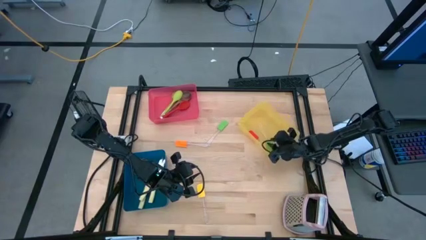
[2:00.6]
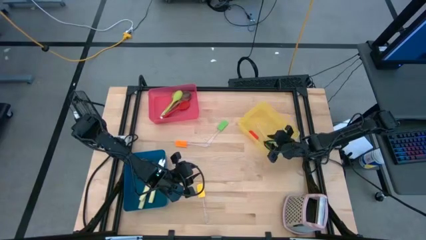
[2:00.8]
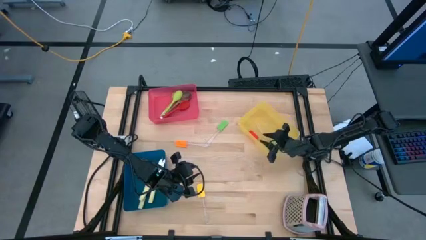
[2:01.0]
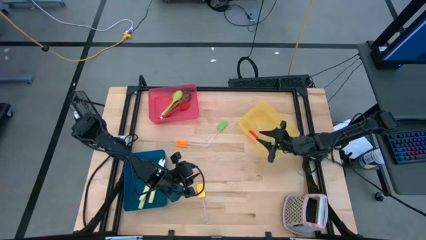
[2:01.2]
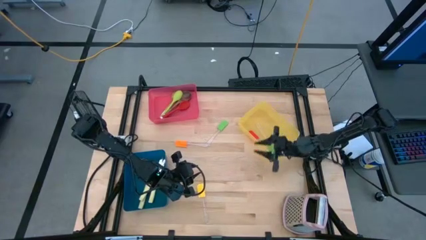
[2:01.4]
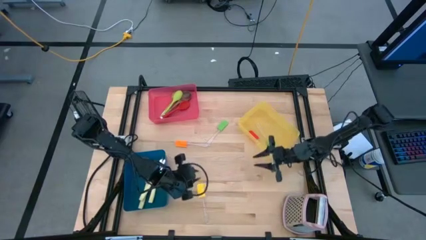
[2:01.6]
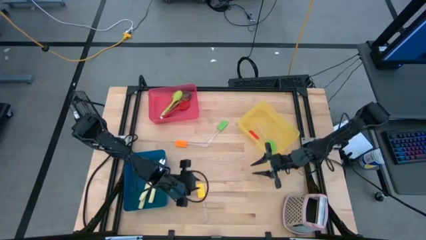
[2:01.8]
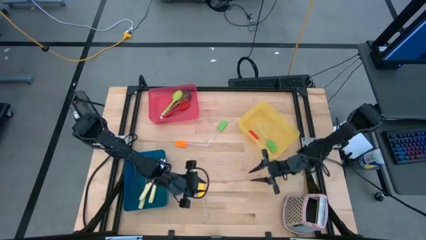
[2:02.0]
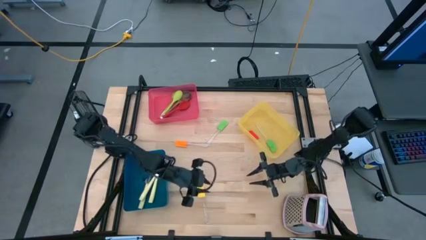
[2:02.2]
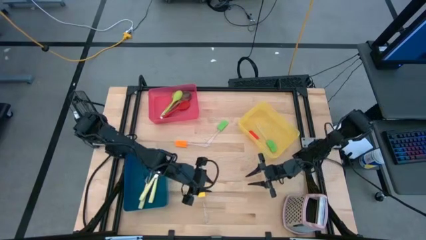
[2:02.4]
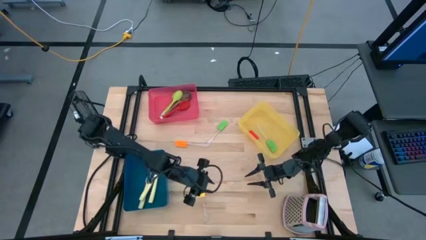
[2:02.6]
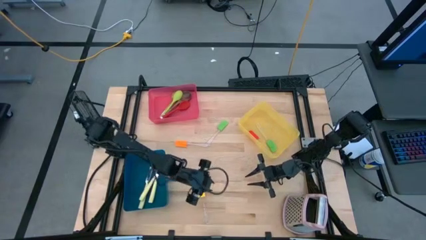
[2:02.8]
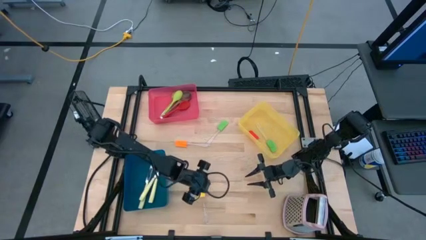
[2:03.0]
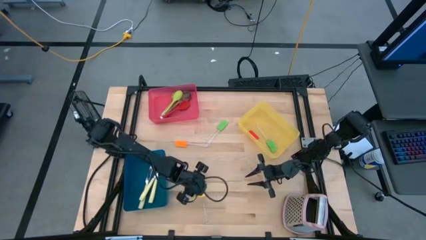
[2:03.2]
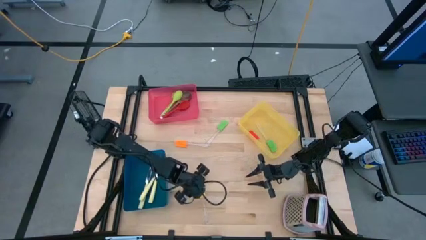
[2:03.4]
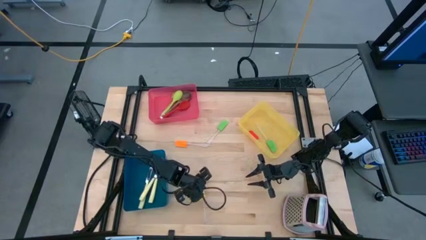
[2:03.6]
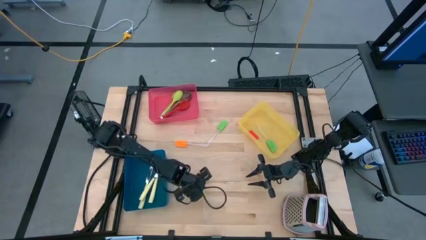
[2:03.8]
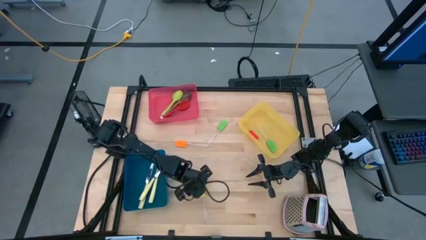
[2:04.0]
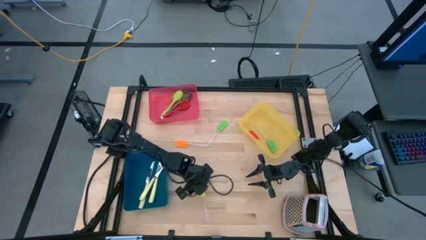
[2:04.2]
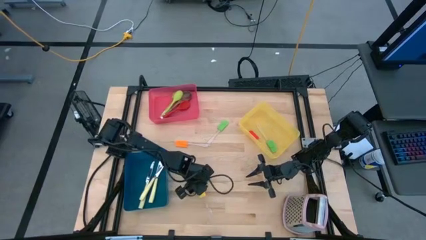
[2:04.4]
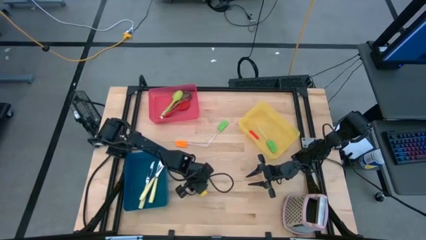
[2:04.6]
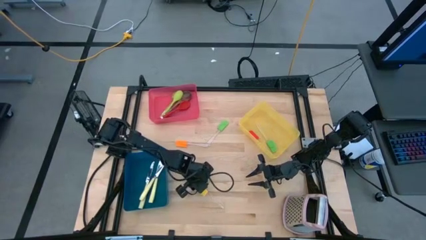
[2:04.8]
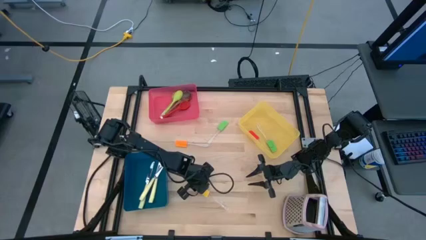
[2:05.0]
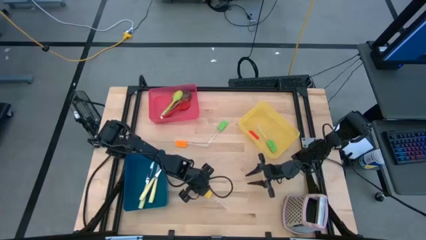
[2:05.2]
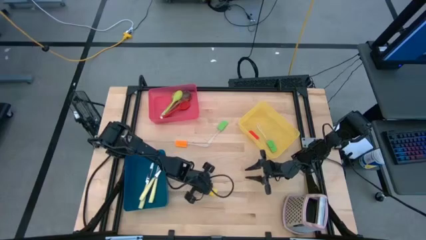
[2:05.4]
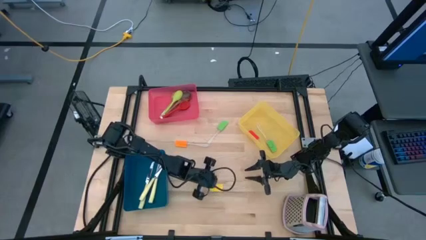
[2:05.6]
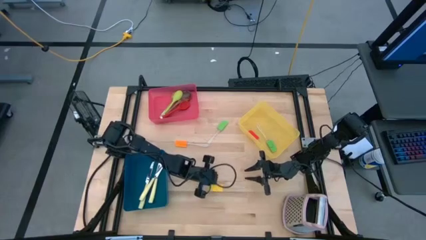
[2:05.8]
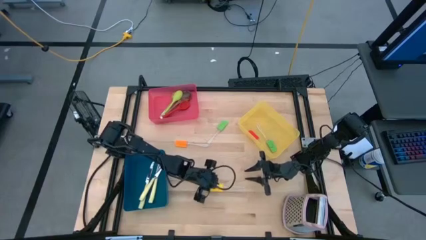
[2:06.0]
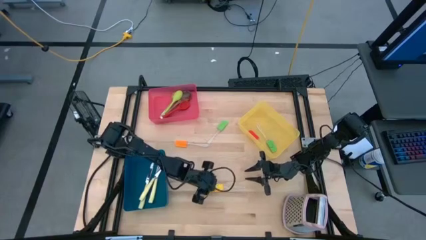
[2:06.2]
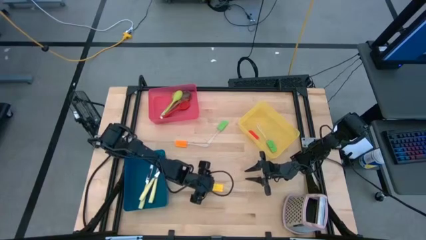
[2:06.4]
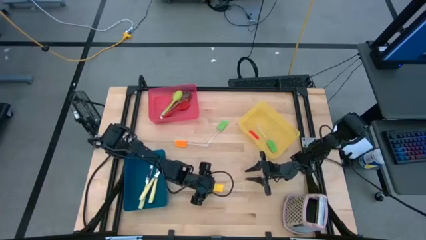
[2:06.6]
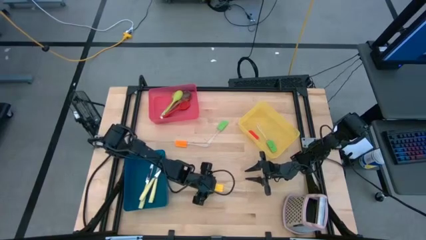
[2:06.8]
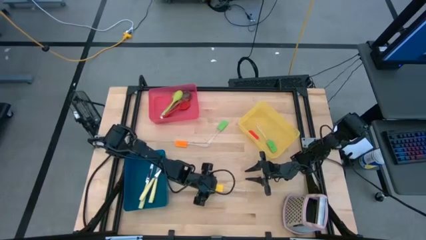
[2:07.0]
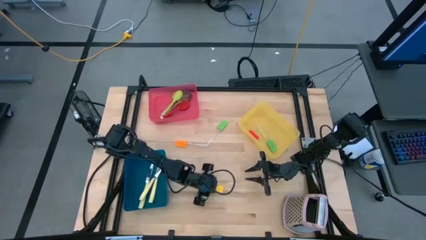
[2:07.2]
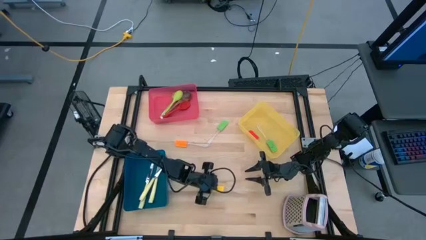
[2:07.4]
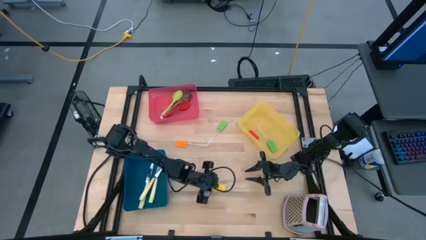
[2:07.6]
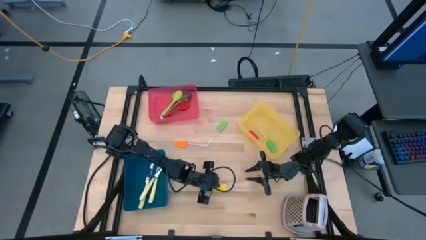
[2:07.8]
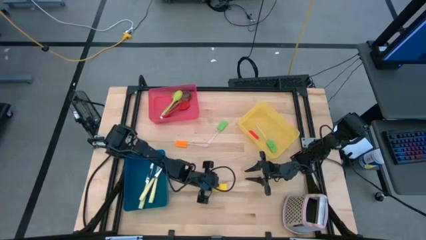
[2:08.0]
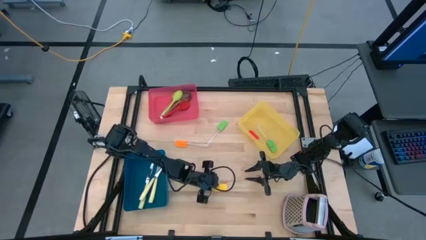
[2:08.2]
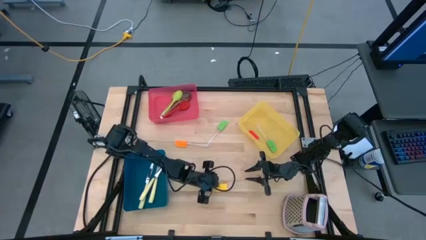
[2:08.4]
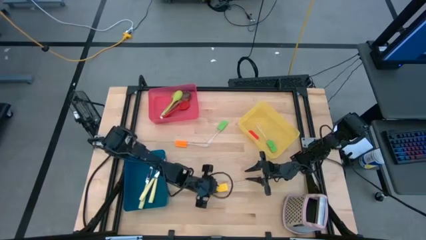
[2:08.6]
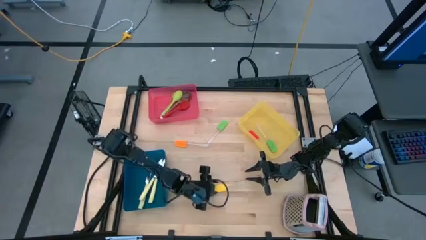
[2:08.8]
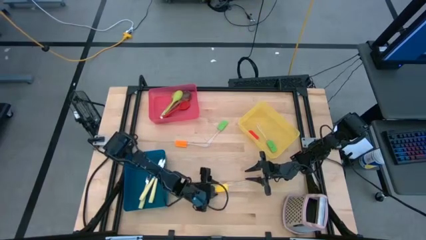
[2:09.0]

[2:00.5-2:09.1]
Task: Pick & Place Kitchen Items
Put the yellow spatula into the yellow bin

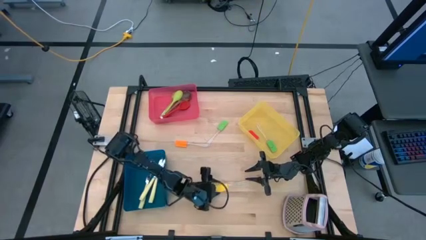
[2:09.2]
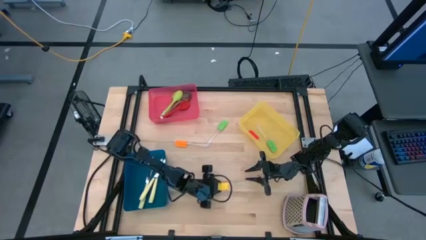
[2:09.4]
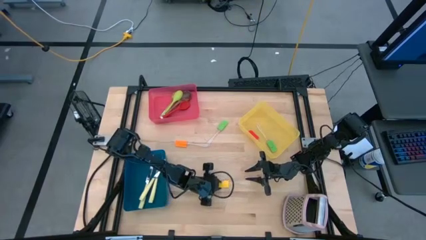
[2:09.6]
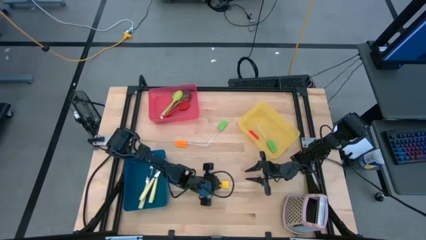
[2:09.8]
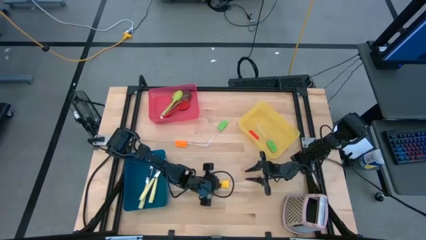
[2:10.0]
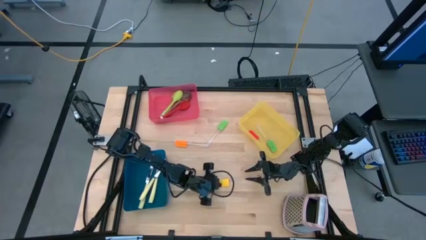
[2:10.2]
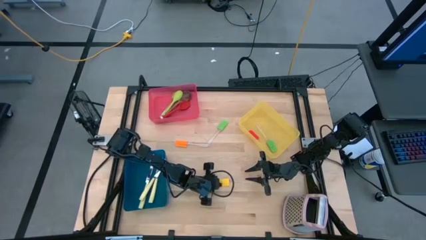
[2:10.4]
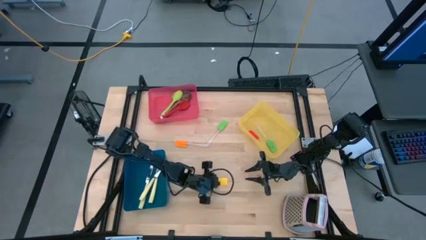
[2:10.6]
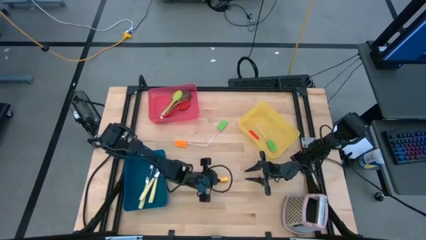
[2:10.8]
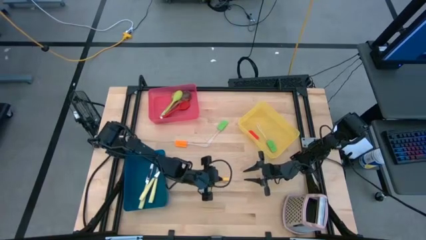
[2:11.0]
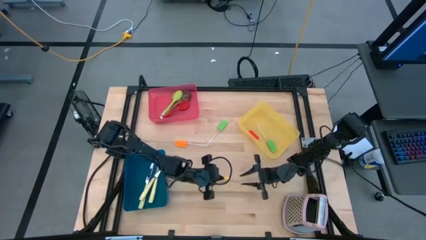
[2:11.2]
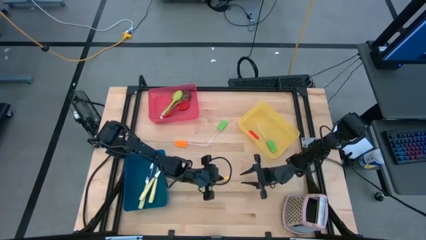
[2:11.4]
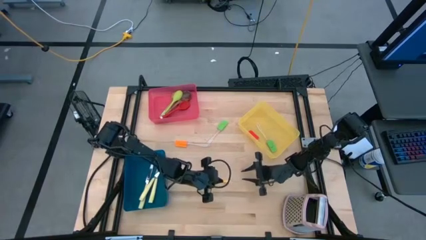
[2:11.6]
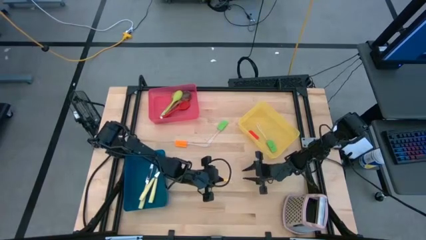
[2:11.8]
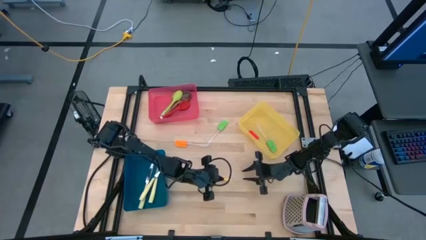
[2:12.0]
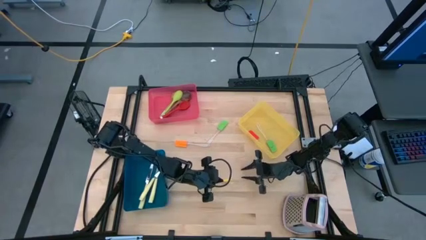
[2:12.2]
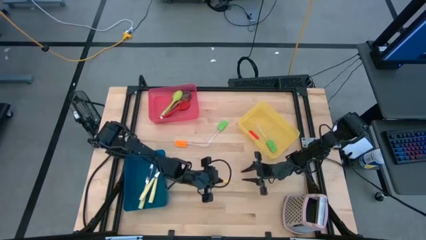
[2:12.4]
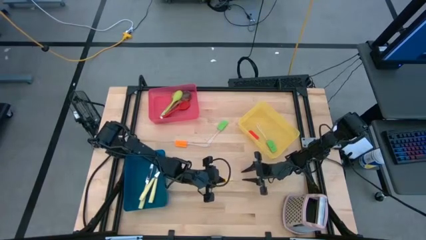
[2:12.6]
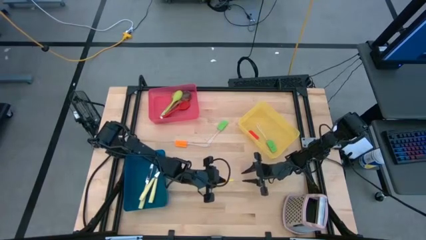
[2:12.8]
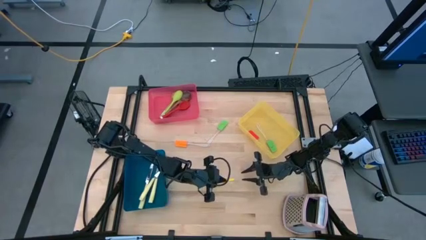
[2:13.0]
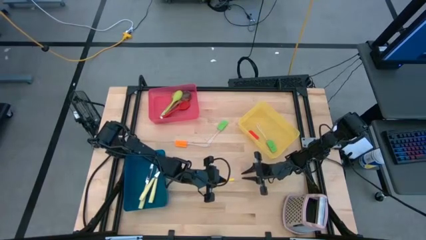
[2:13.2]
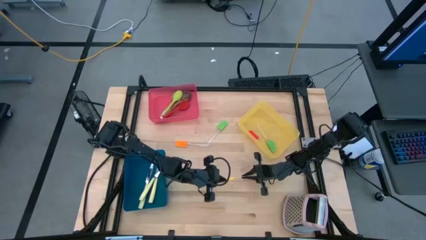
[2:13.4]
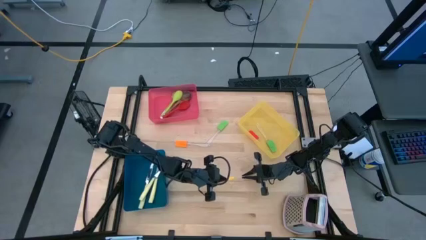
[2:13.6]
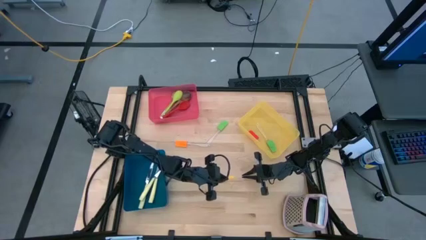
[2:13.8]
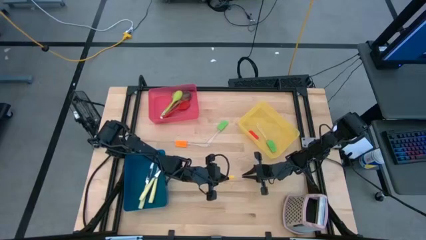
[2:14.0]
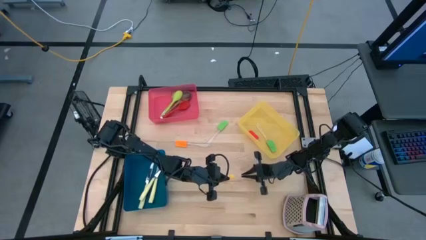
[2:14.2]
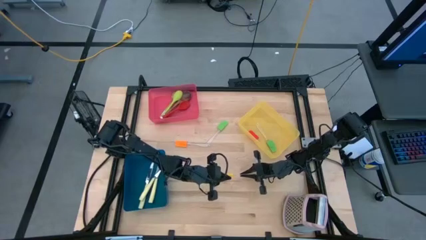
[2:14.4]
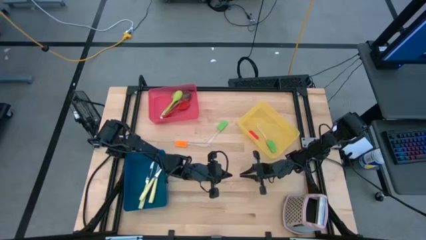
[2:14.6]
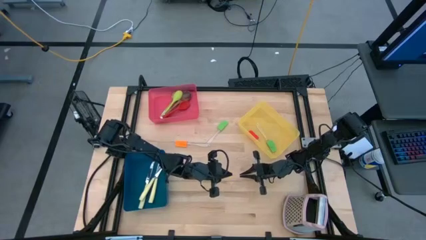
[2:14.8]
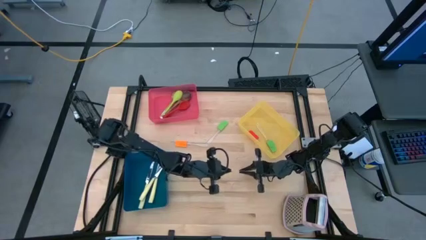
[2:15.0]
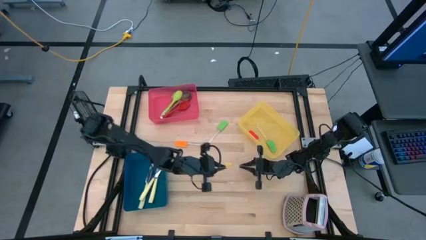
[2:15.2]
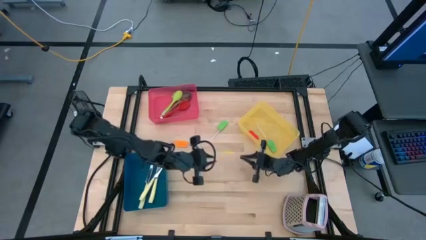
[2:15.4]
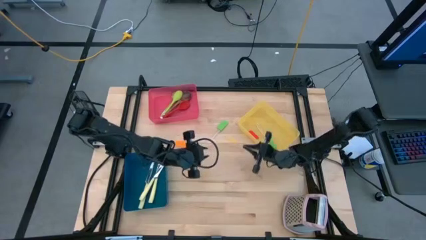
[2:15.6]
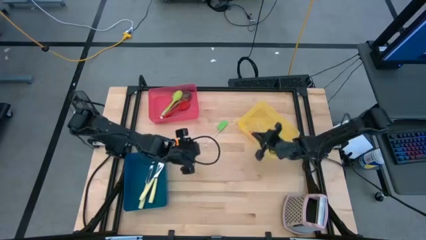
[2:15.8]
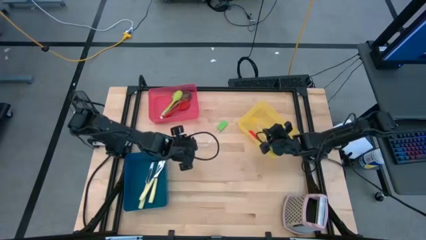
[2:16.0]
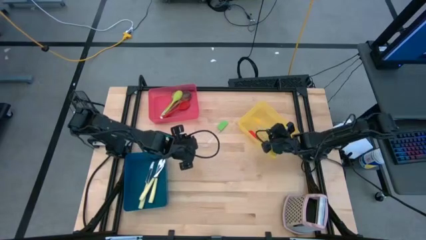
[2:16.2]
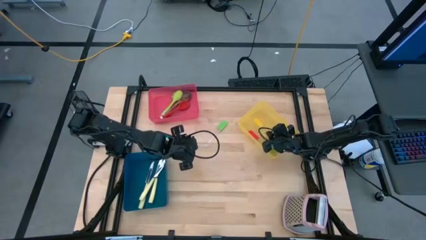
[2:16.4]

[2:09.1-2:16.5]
Put the yellow spatula into the yellow bin
